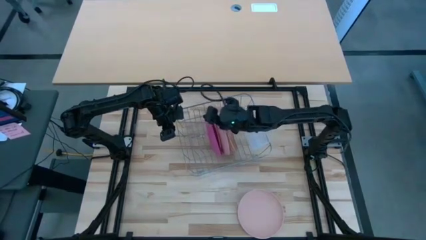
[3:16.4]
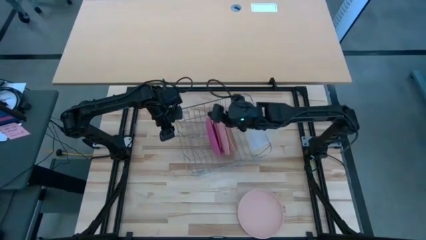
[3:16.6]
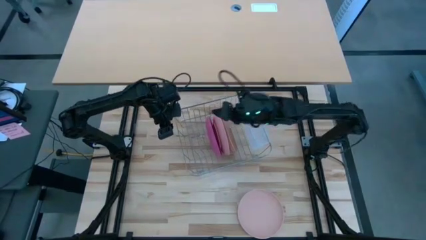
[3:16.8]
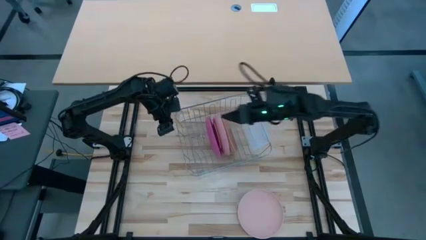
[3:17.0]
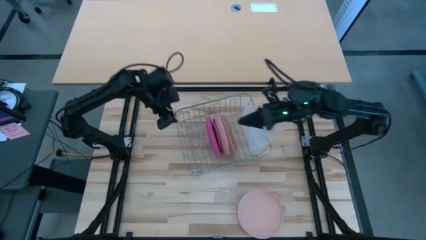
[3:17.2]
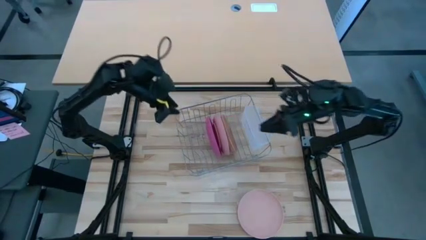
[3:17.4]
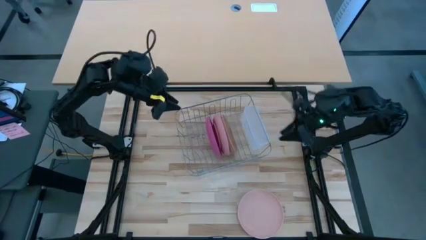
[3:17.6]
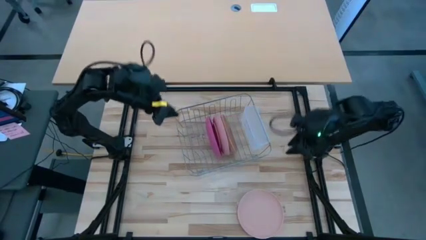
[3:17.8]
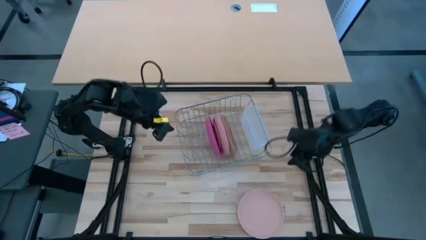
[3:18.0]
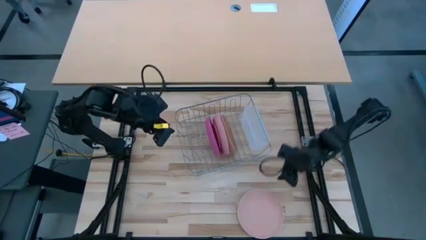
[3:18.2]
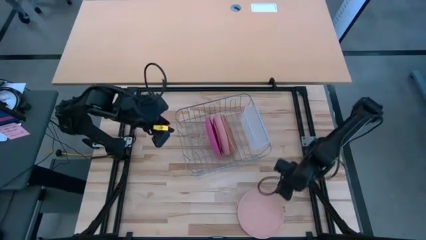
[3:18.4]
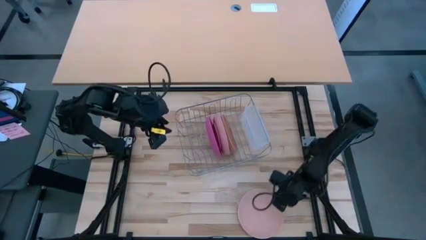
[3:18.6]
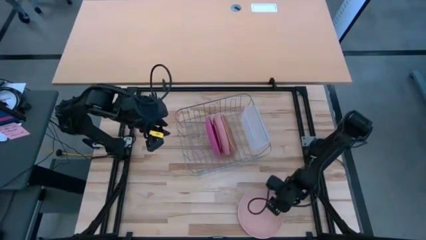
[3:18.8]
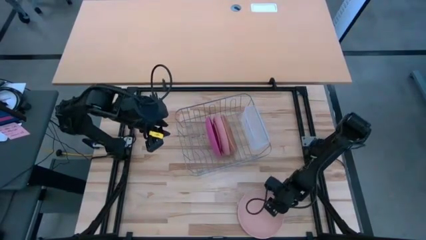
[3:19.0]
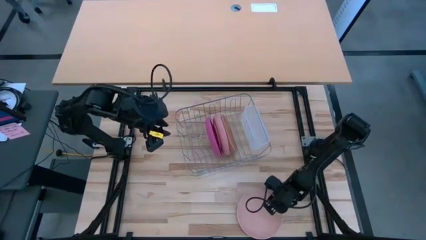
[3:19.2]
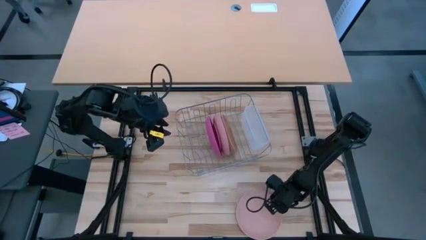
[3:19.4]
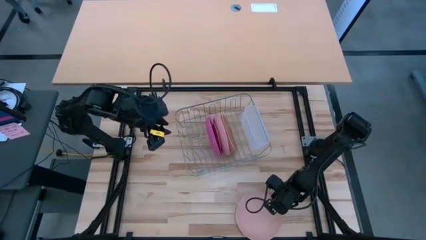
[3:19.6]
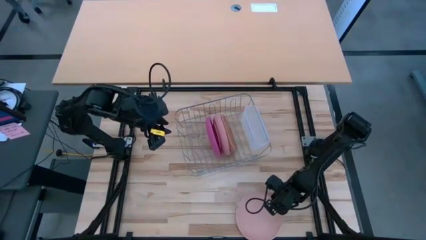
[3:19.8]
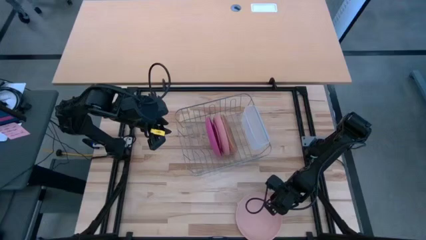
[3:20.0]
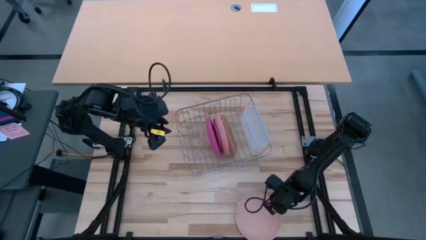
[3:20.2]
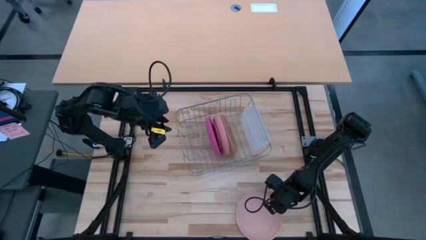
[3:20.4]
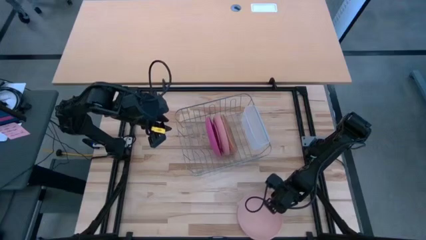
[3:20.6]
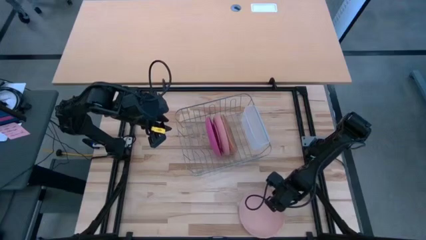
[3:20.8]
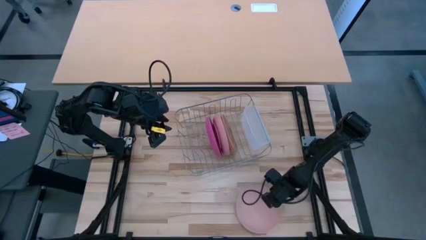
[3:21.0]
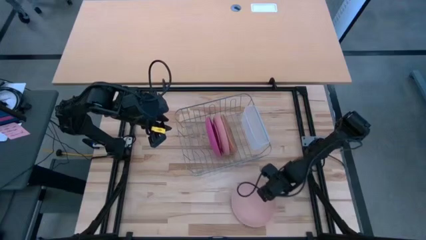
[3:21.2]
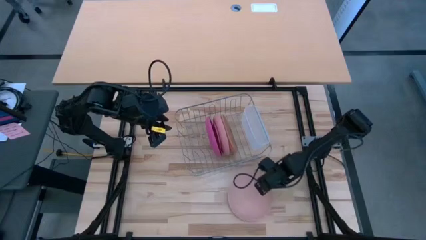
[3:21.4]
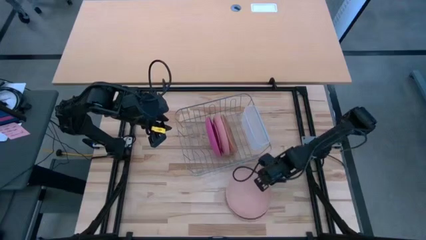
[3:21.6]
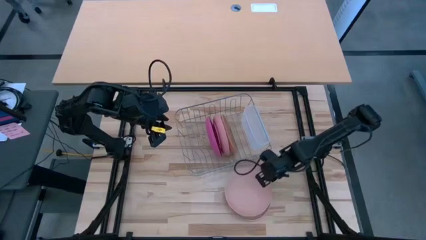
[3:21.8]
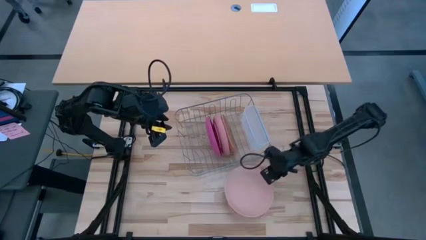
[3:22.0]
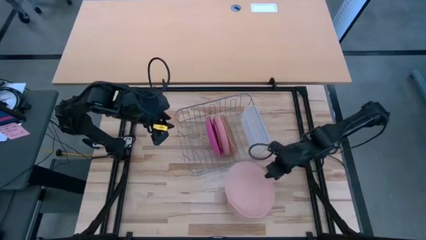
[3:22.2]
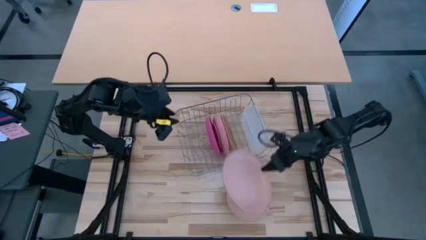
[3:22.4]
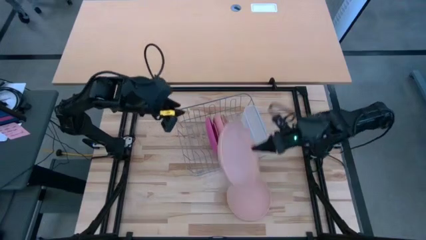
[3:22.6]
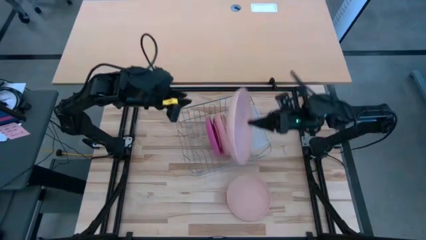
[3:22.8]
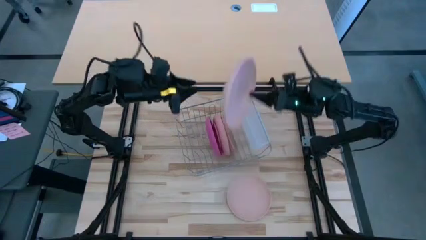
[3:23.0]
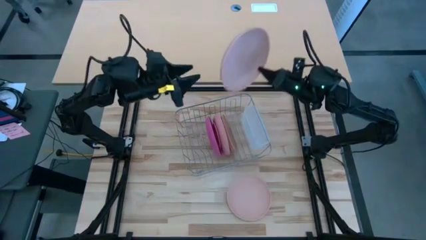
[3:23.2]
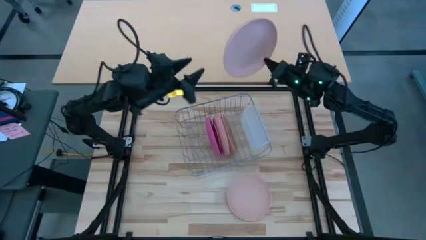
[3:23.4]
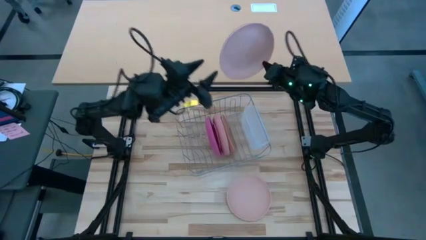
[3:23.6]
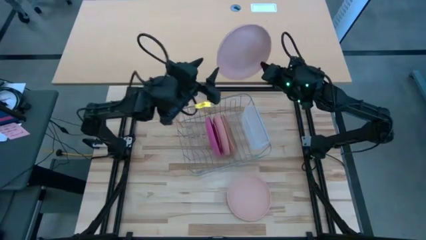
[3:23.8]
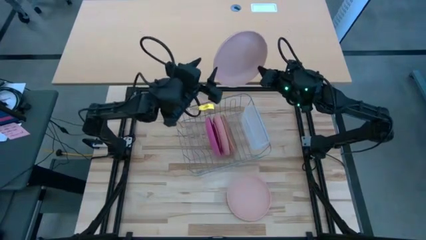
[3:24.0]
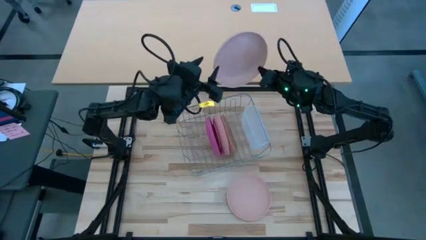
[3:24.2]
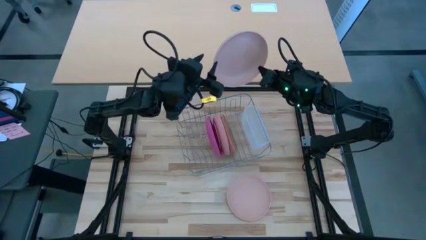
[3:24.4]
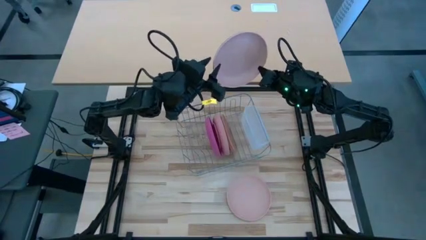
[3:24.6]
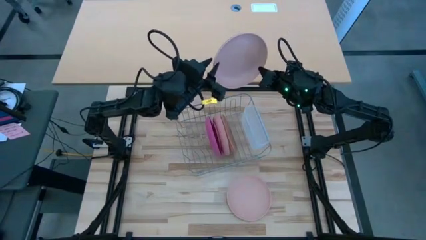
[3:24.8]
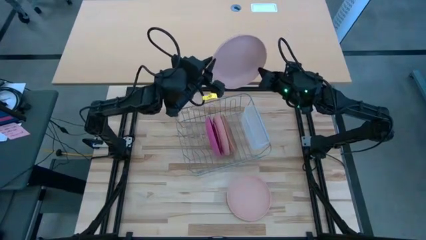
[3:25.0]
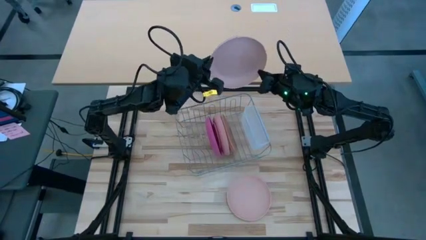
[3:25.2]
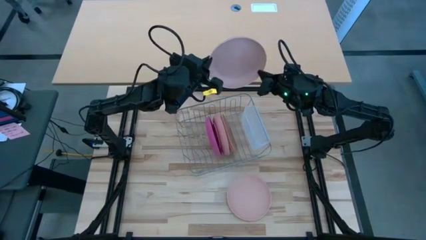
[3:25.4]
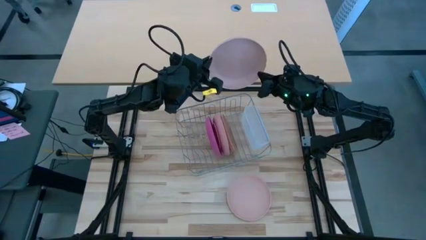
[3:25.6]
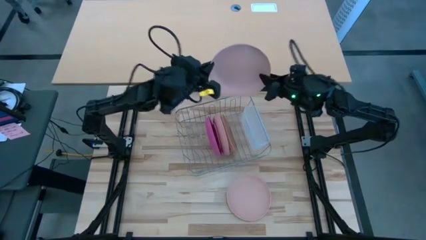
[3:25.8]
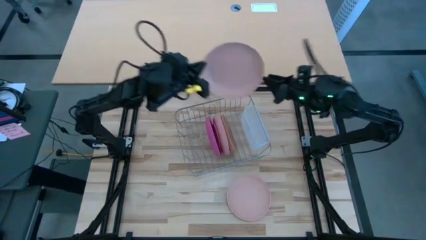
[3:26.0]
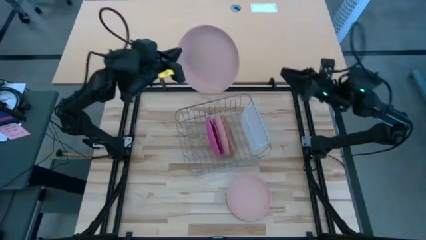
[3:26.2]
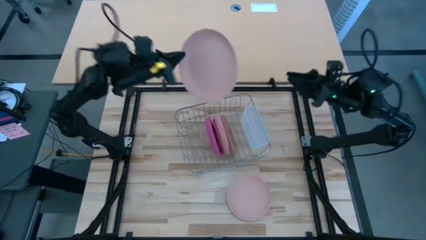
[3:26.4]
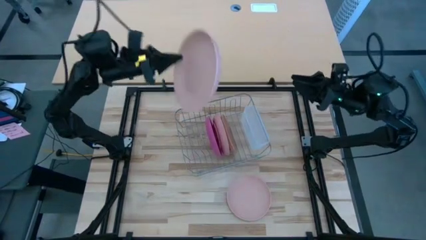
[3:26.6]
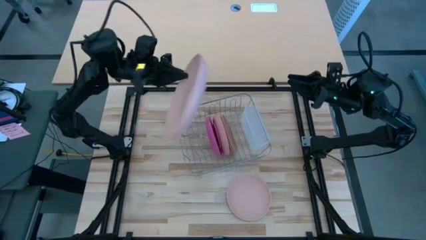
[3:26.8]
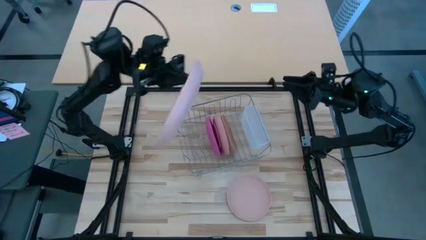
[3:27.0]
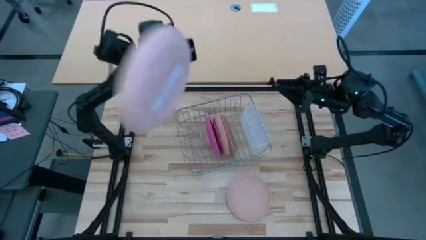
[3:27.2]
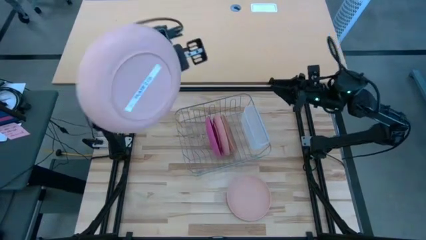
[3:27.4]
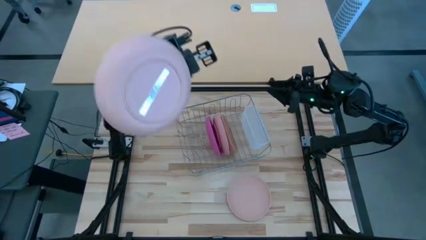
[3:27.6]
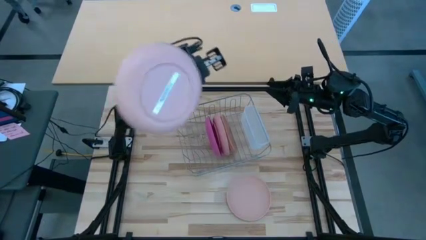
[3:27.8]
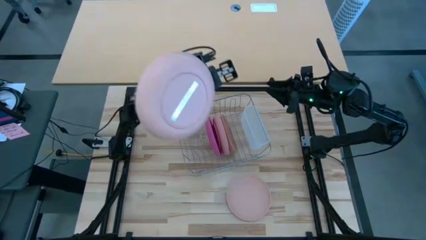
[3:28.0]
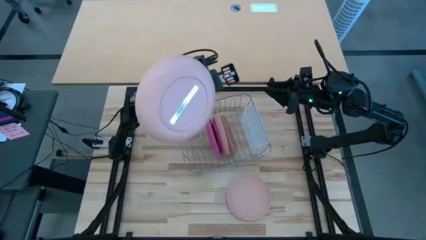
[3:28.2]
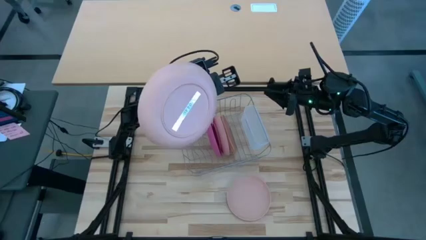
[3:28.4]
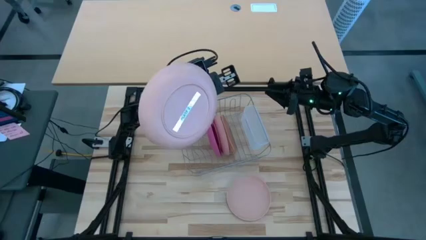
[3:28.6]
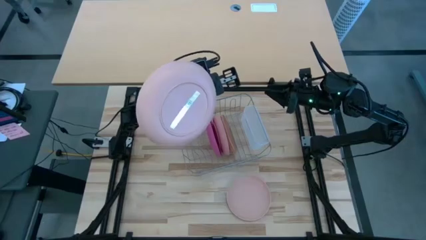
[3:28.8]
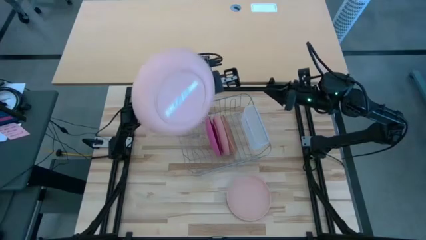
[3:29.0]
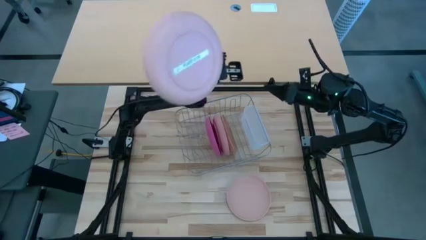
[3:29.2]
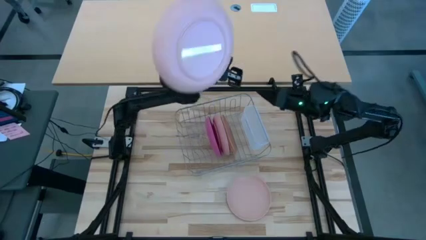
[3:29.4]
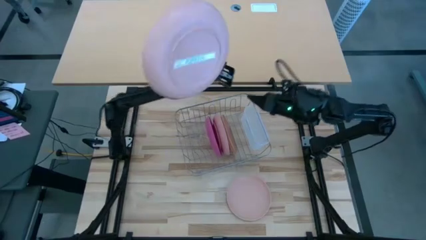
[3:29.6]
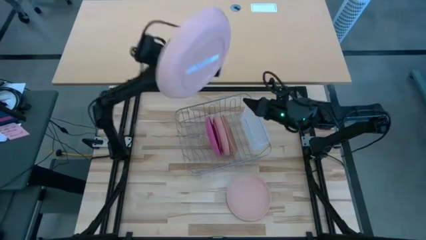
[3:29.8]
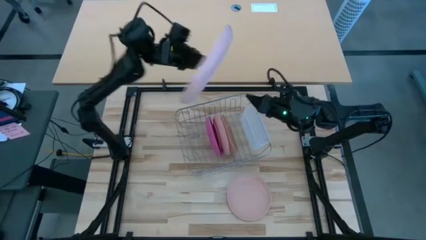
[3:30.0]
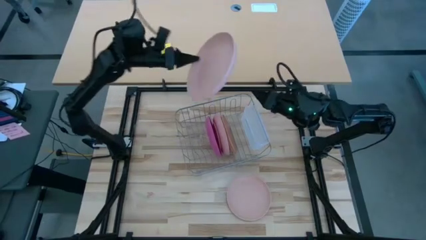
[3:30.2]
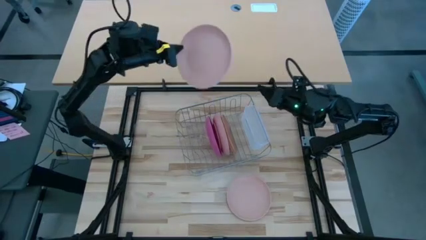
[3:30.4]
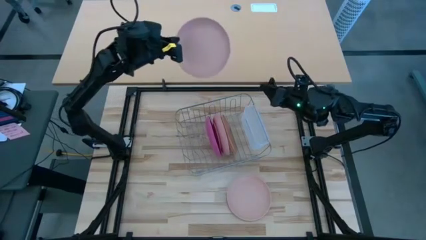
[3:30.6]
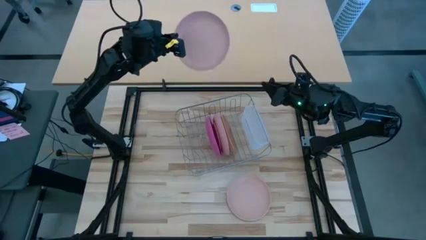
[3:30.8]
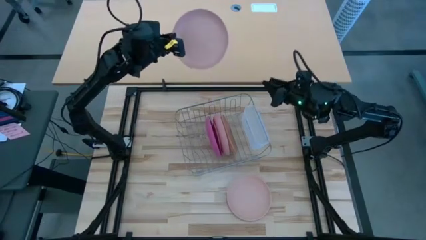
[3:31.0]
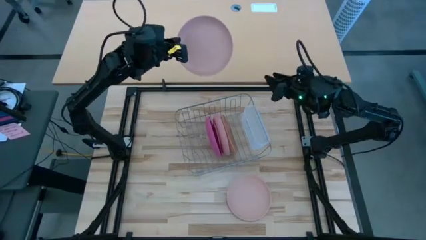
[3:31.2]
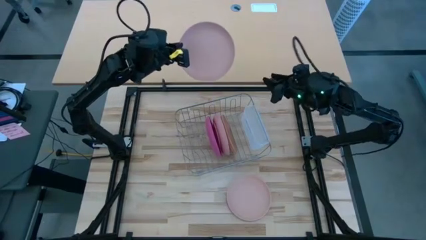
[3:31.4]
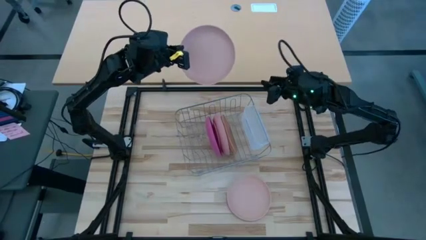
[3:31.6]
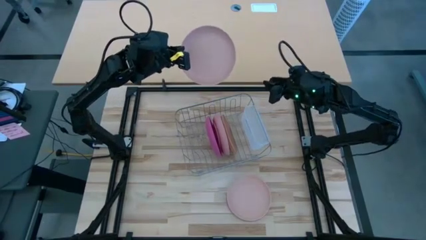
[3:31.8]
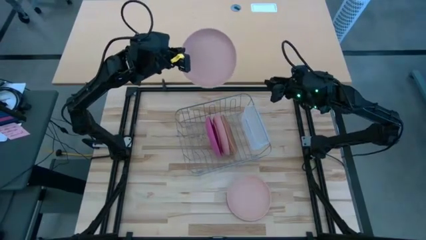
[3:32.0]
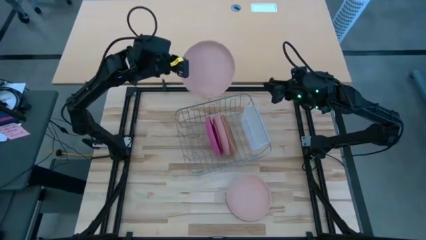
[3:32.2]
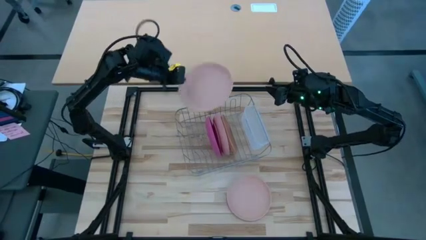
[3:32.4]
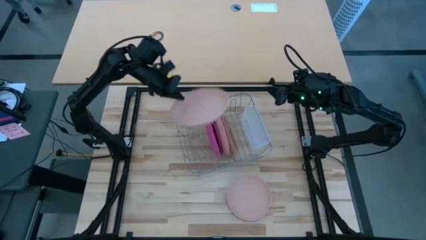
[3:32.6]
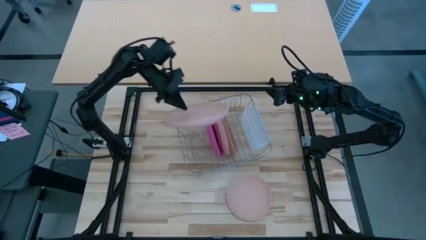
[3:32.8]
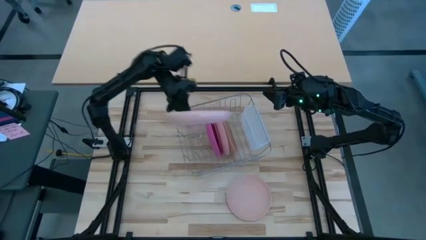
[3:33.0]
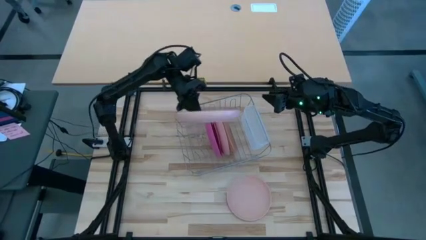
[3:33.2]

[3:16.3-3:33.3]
Task: Sort dishes
Put the top beige plate in the dish rack
